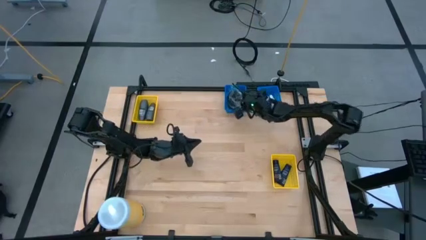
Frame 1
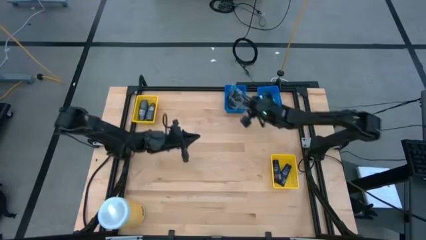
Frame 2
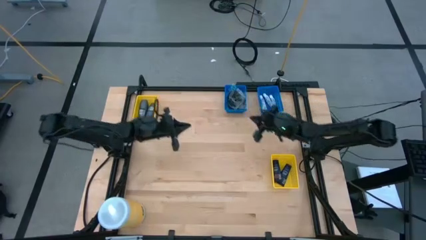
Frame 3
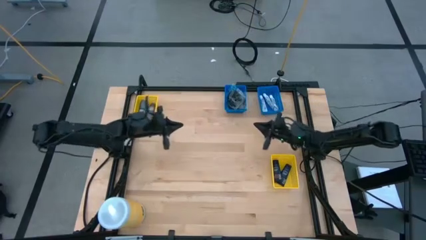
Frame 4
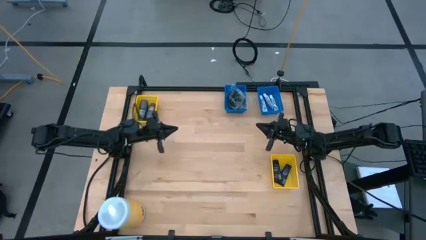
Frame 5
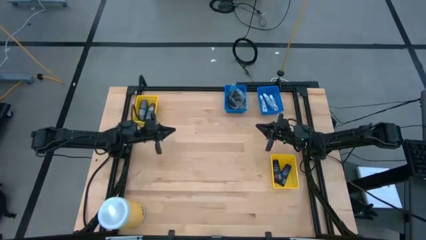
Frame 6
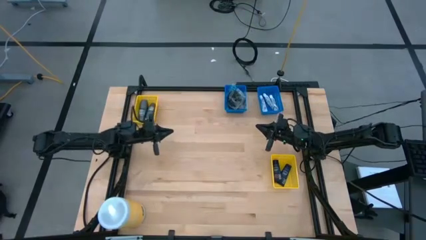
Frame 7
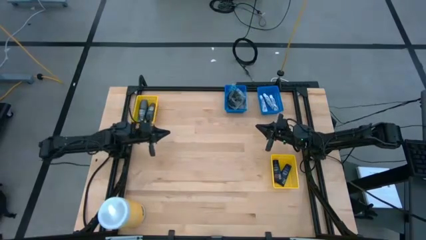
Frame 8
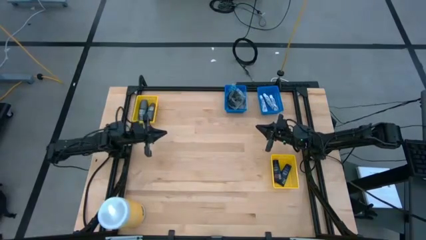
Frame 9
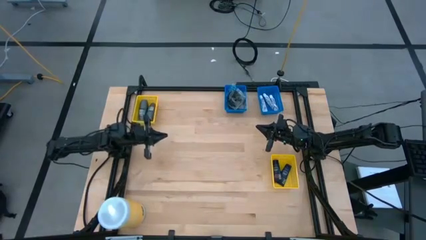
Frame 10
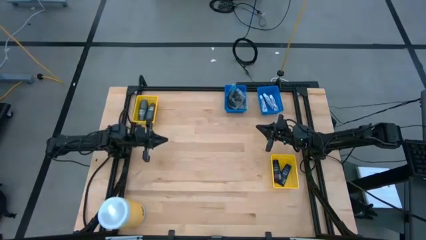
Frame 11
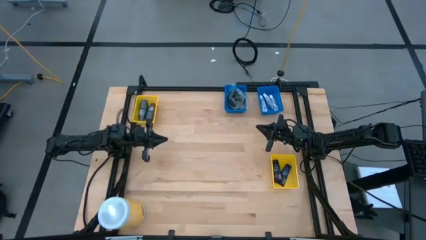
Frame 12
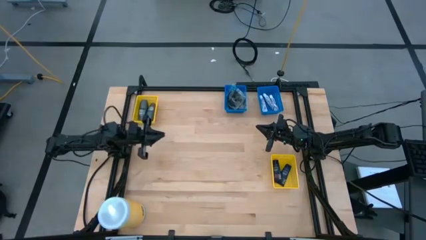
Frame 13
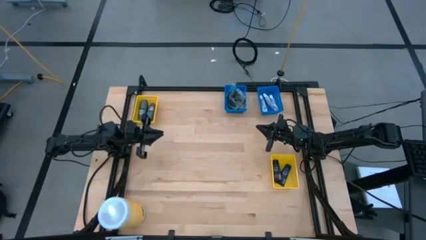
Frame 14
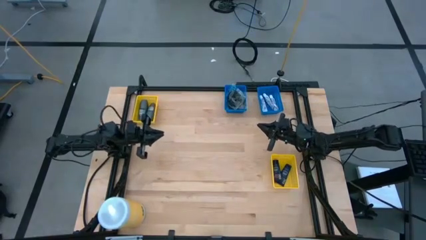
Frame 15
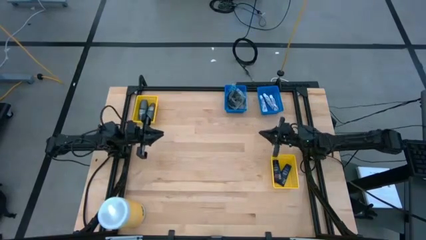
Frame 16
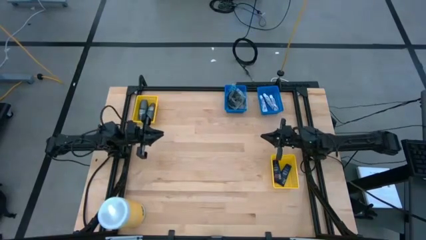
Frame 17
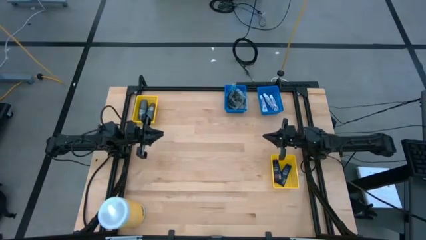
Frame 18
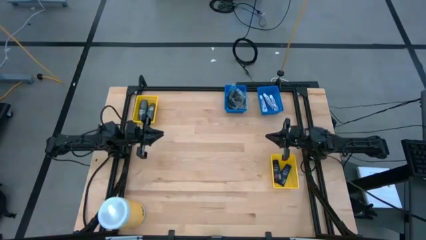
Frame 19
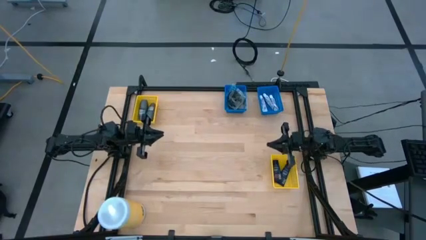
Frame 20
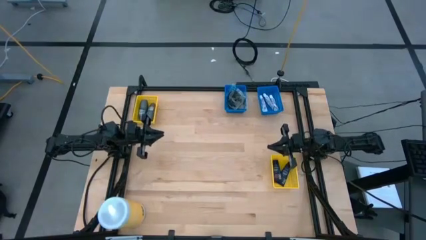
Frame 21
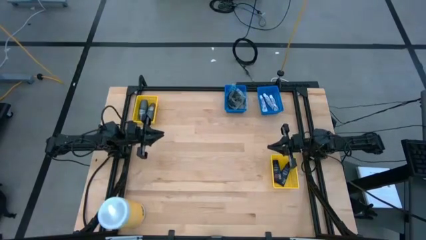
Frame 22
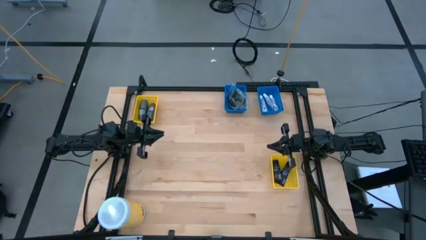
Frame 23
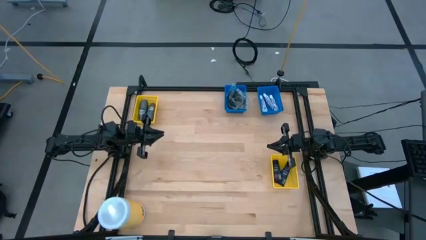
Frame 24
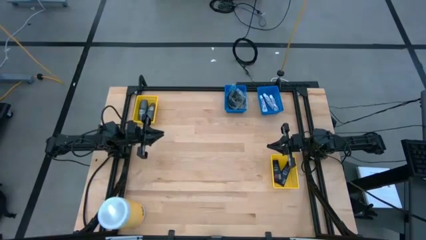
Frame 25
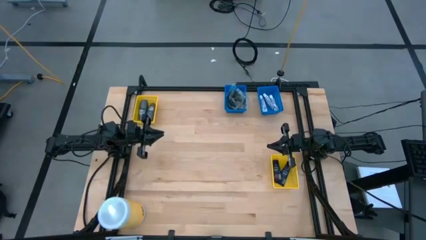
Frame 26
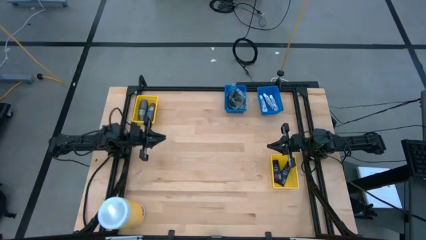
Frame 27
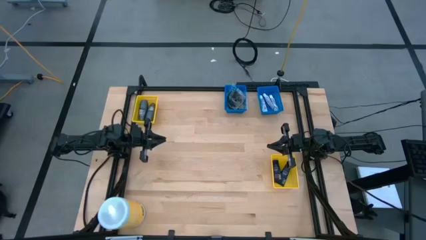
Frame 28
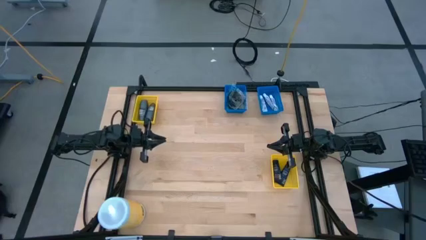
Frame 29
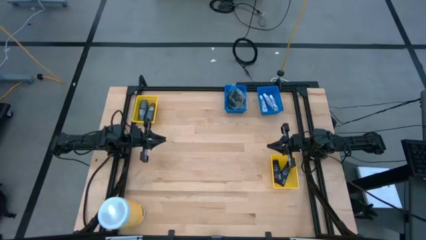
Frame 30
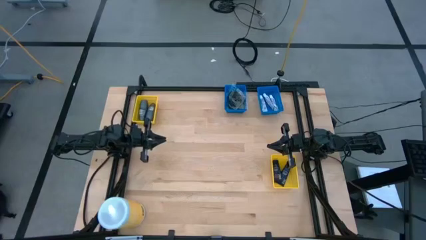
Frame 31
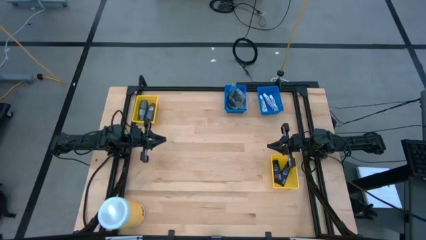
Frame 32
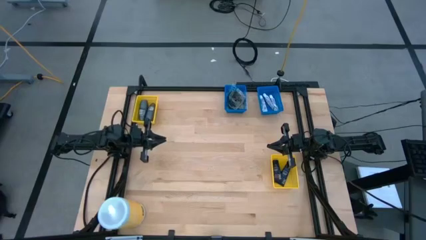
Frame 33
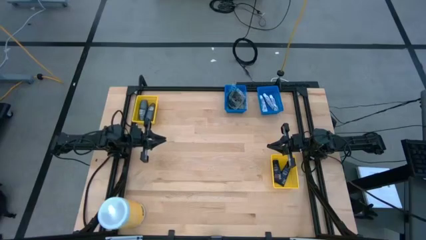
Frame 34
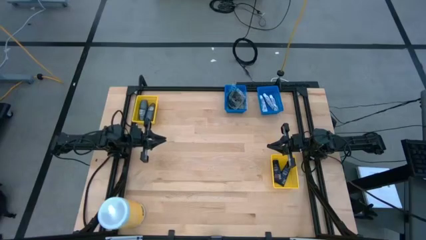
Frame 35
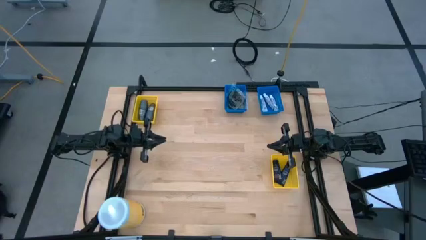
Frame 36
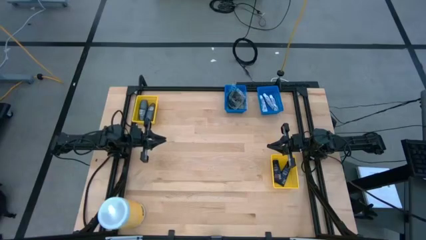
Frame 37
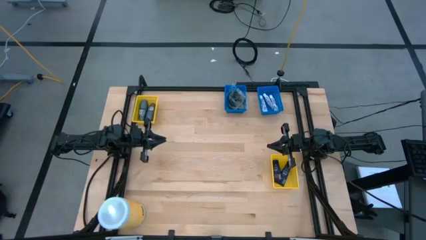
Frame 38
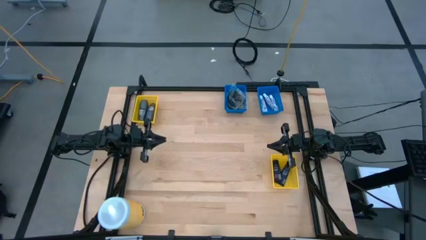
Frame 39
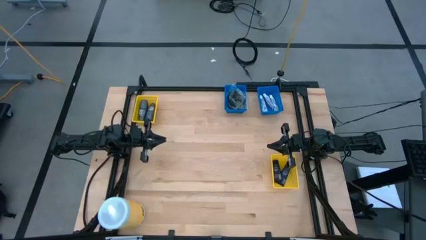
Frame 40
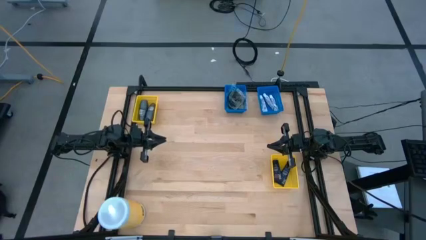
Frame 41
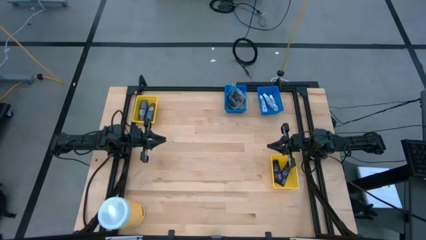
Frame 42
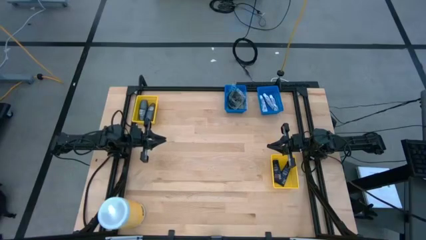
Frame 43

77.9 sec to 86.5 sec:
Task: Pick & Place Travel size toiletries
Return to Home Position

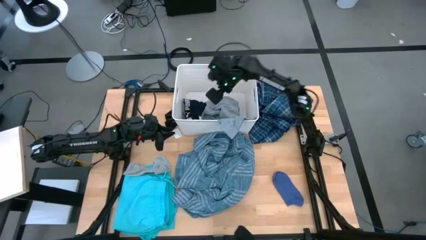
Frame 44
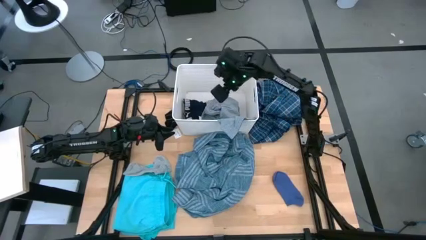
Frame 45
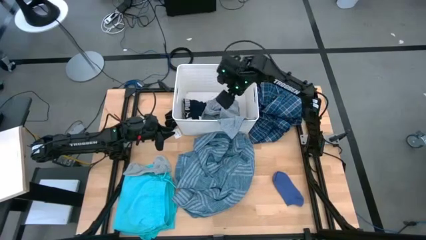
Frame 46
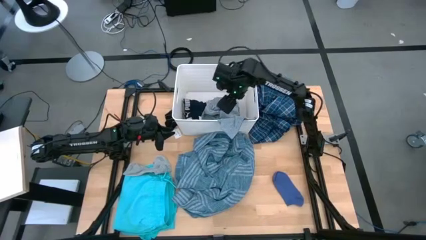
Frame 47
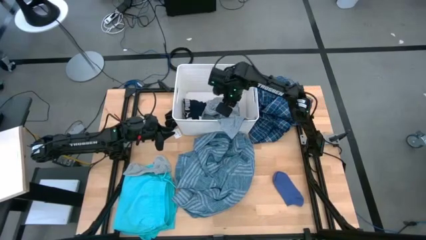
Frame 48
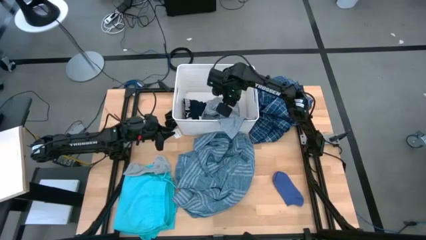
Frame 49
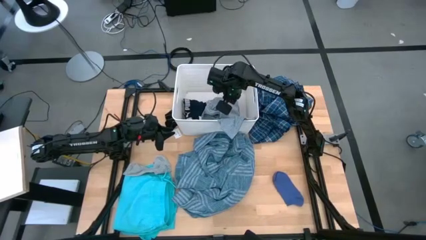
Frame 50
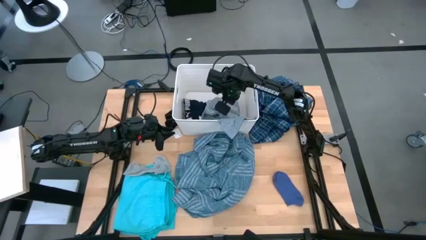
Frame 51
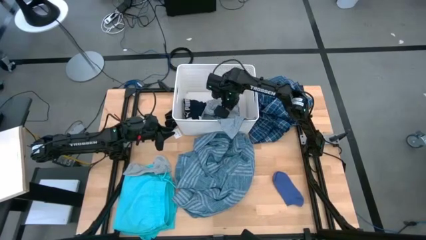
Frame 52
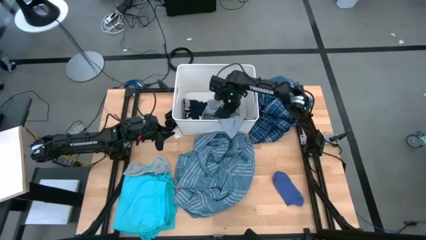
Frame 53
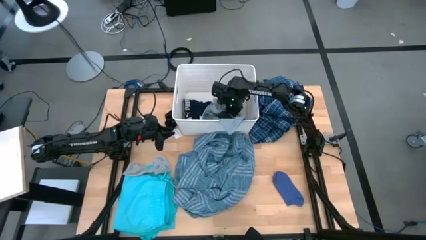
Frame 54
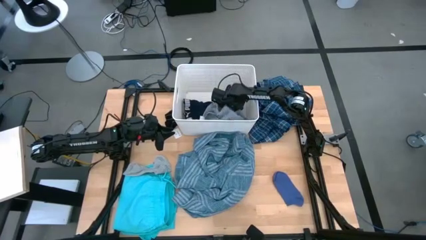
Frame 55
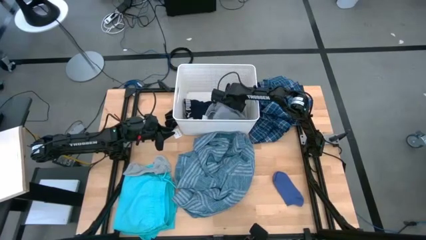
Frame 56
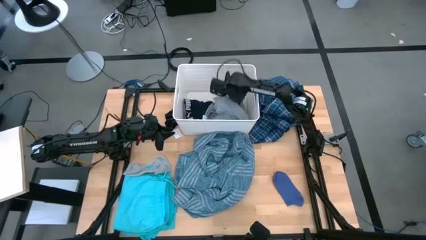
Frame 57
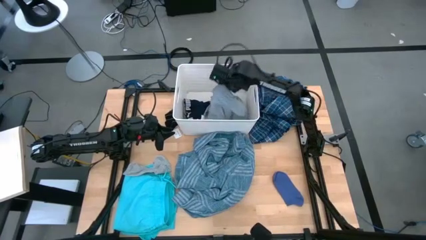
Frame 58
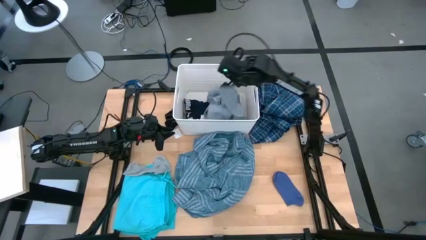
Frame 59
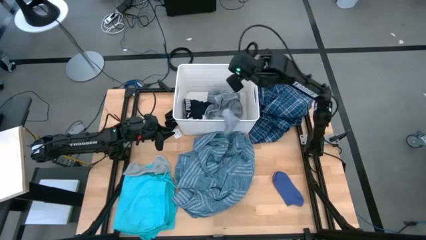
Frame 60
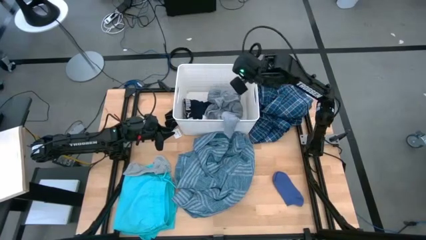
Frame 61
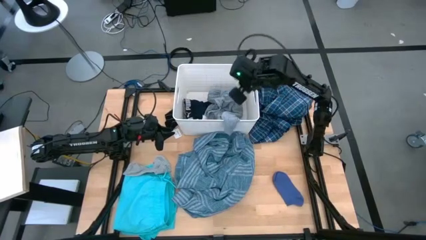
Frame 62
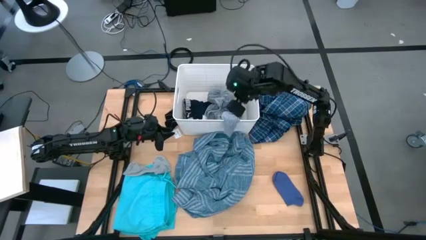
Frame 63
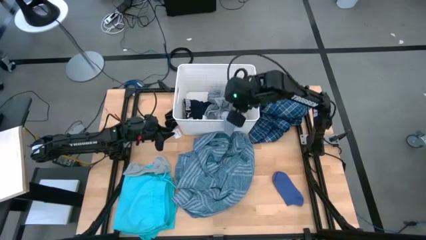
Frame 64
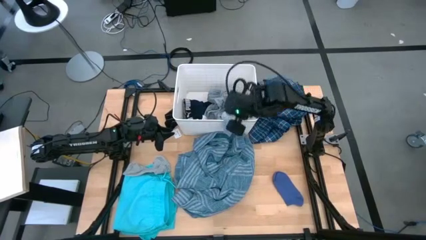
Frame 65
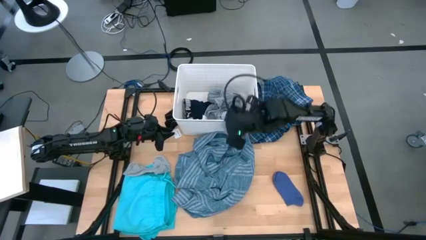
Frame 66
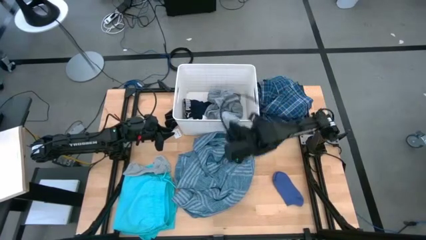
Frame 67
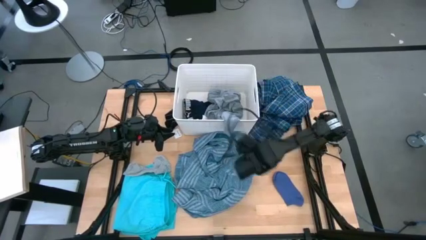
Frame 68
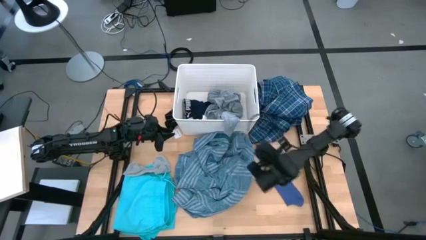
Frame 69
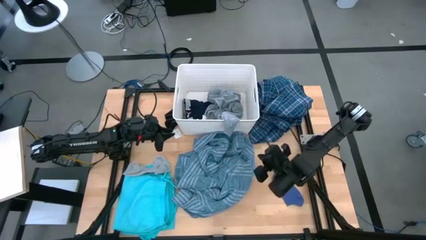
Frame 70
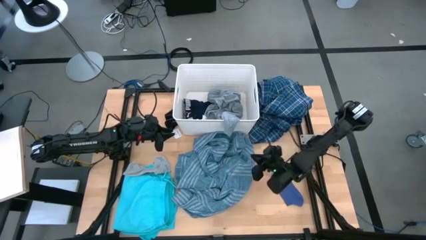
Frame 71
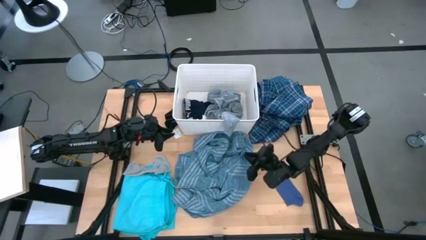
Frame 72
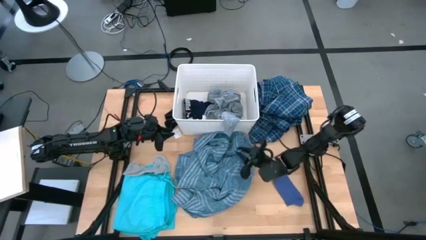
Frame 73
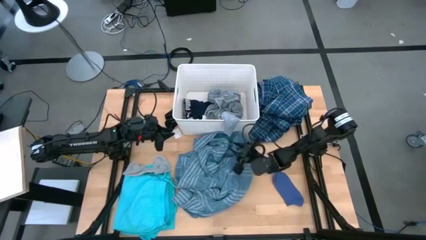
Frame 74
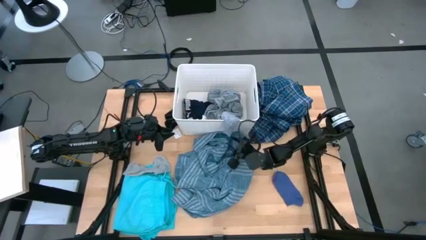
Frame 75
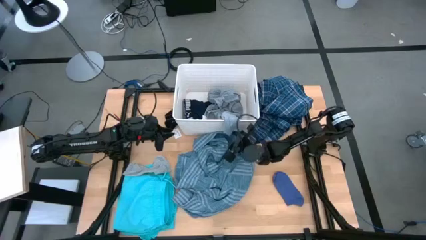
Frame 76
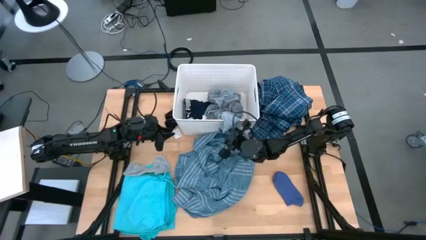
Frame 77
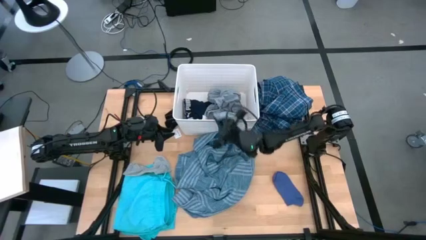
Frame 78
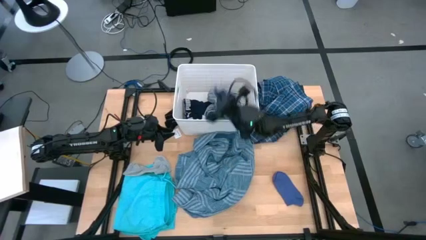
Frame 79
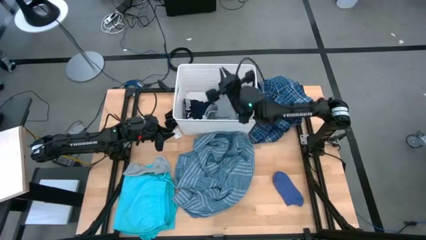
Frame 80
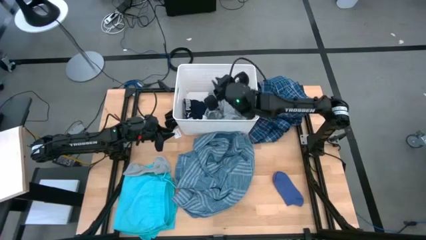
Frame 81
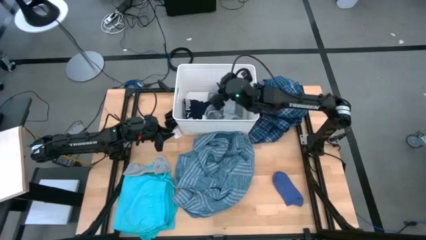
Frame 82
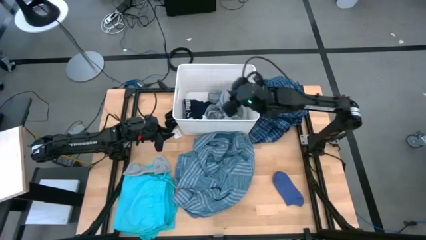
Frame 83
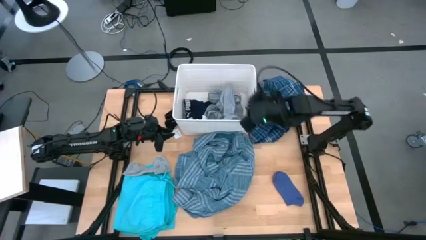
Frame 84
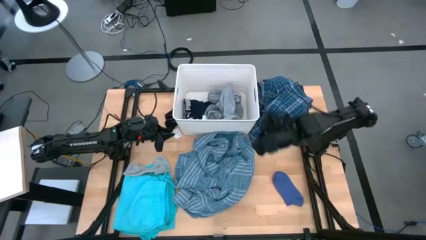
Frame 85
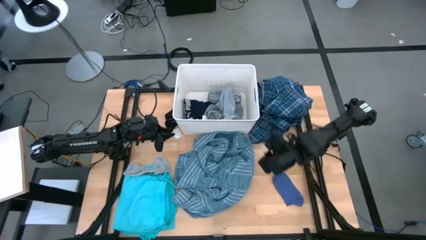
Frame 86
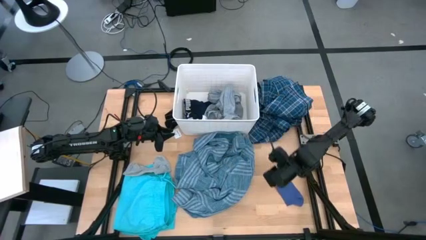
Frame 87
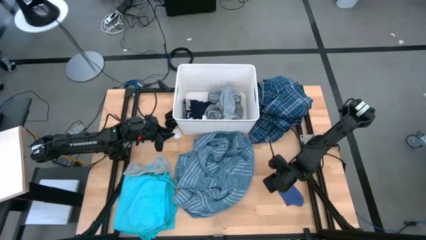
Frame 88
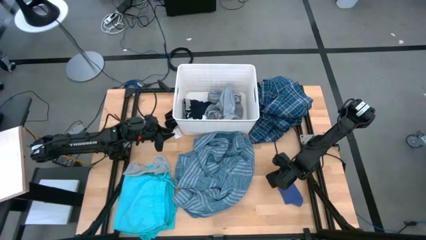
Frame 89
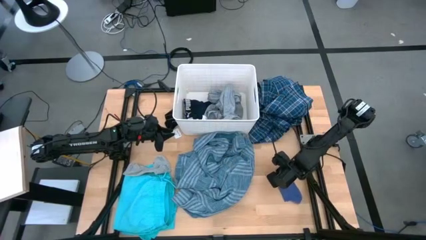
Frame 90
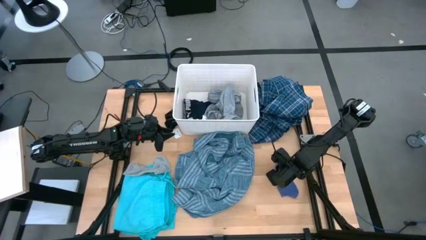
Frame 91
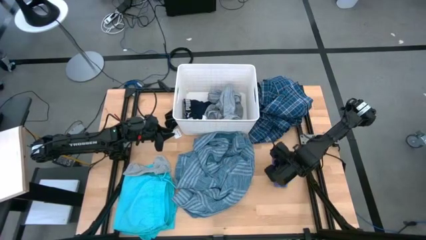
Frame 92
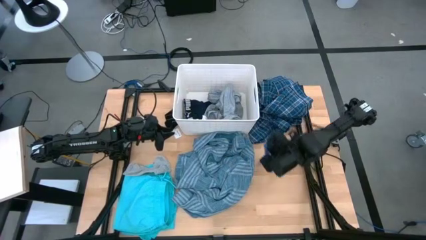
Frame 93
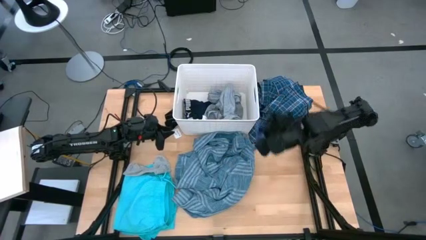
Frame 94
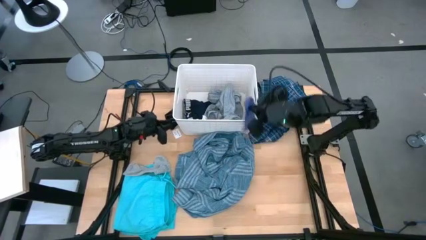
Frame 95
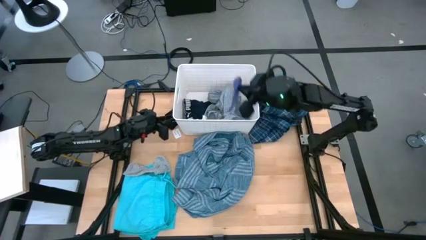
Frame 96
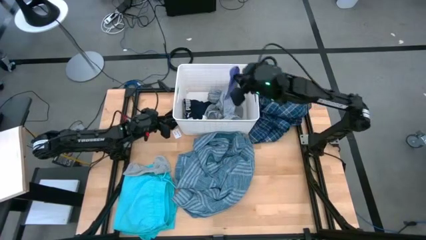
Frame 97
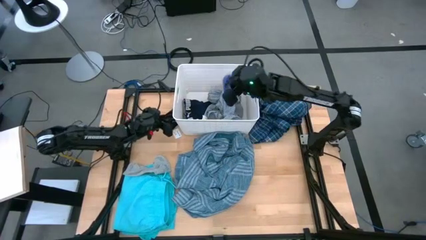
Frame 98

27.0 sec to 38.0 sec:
Task: Sort clothes
Put the blue sock into the white laundry bin
